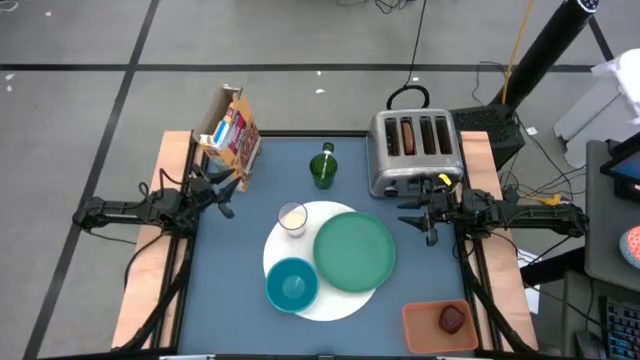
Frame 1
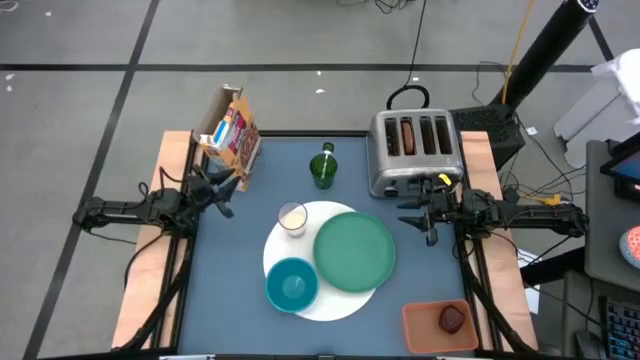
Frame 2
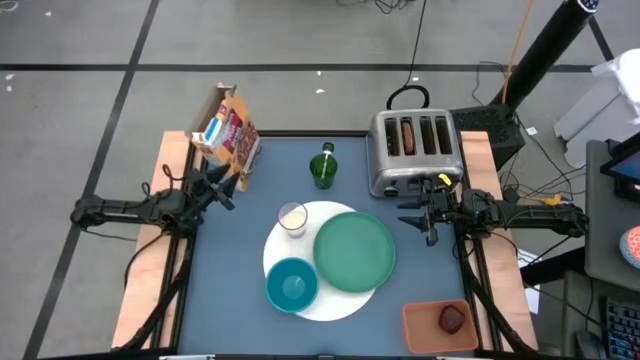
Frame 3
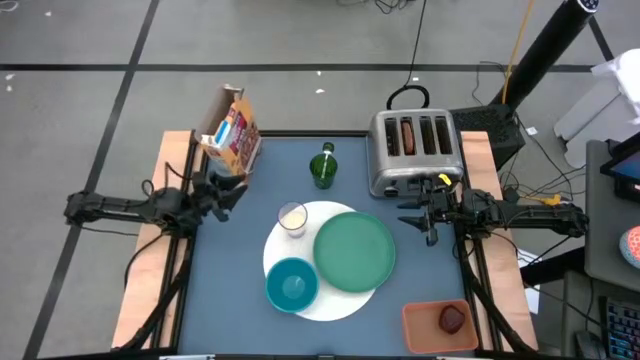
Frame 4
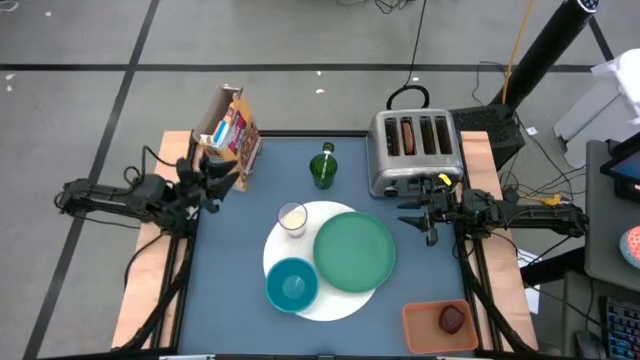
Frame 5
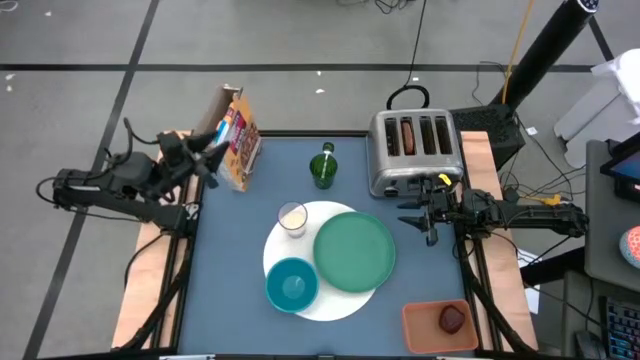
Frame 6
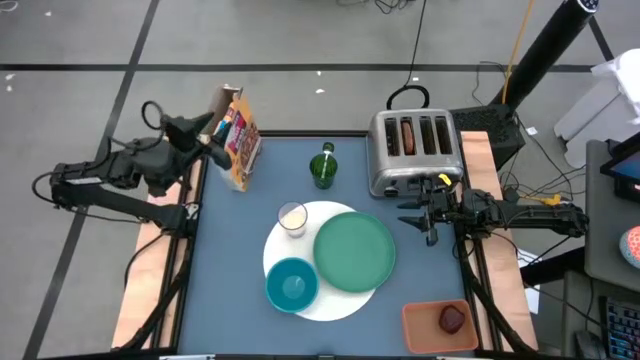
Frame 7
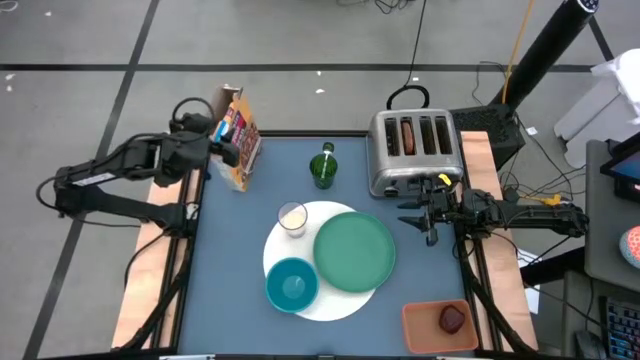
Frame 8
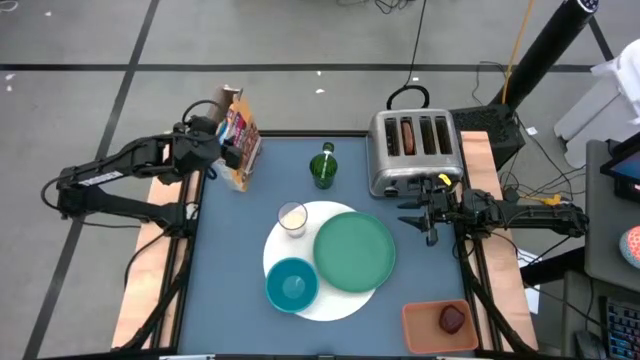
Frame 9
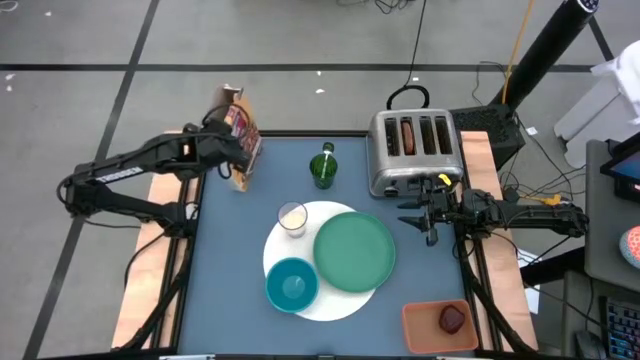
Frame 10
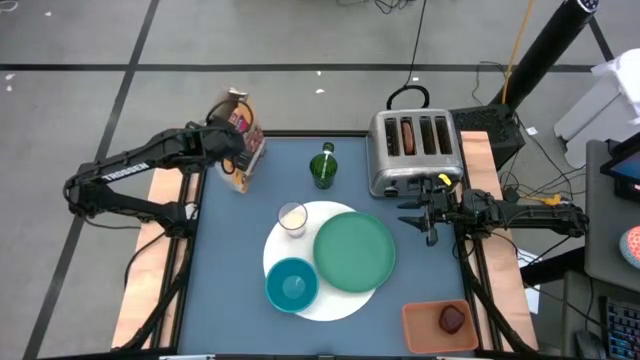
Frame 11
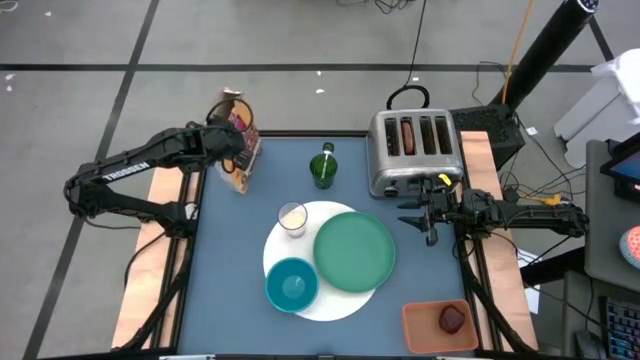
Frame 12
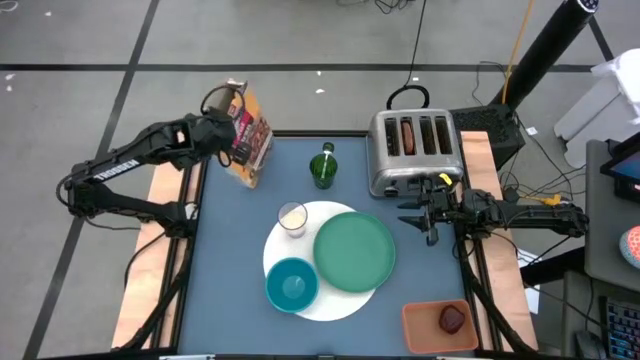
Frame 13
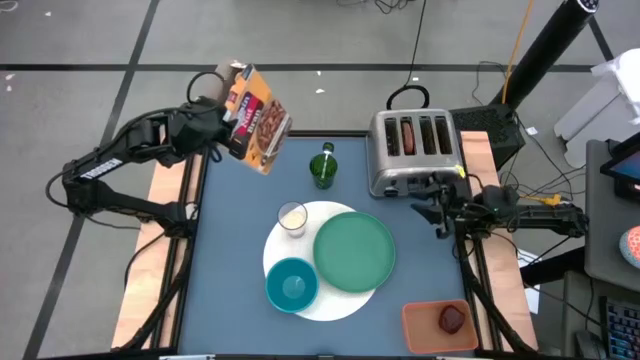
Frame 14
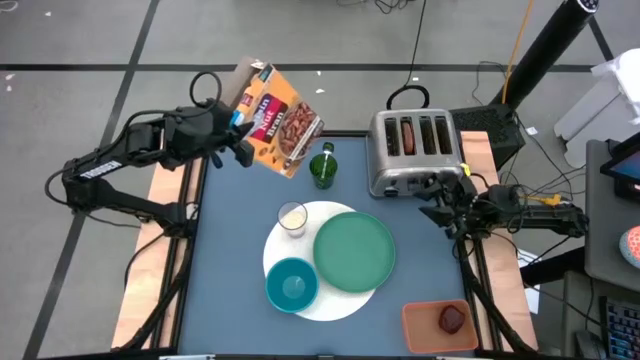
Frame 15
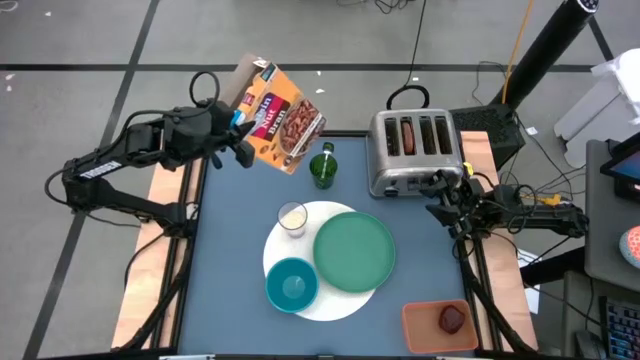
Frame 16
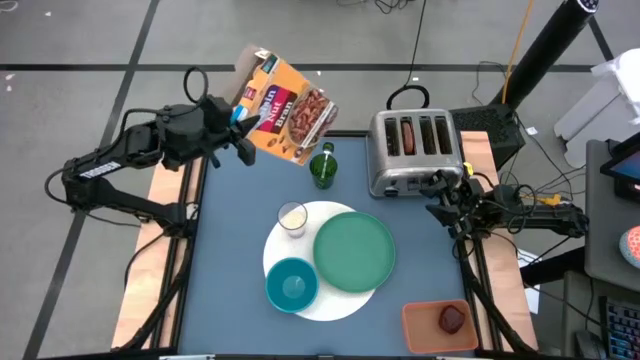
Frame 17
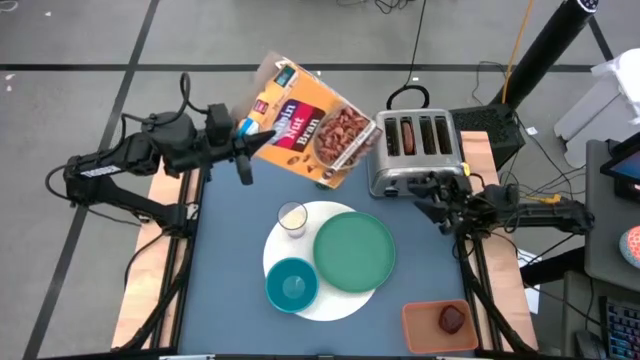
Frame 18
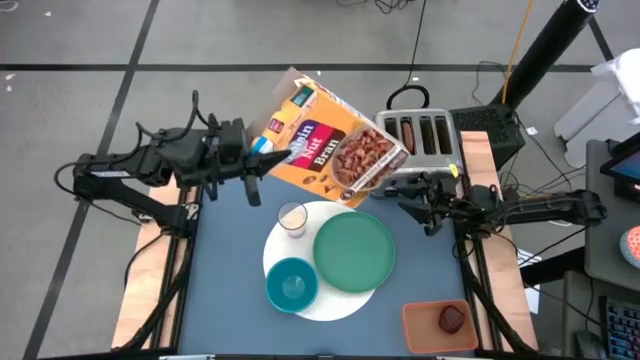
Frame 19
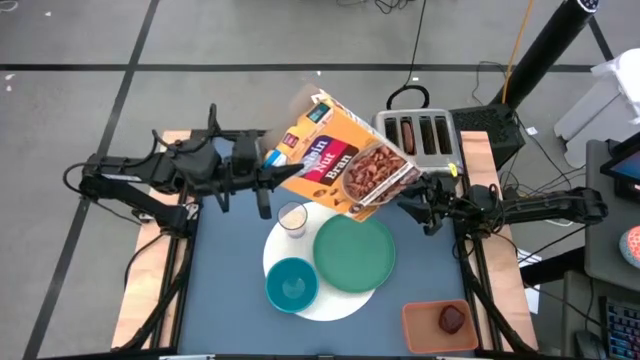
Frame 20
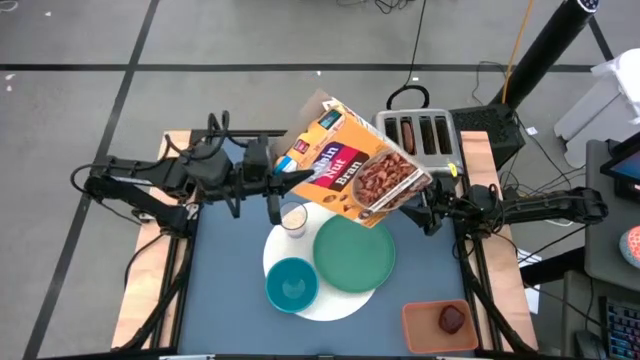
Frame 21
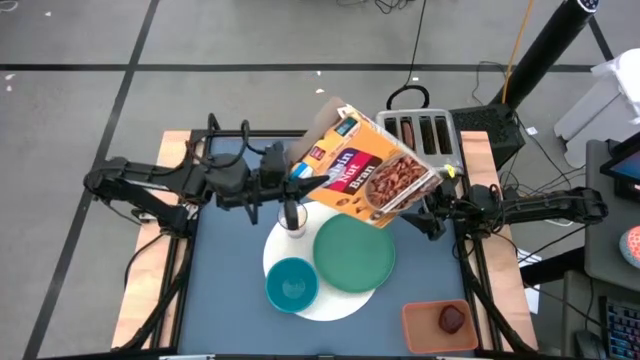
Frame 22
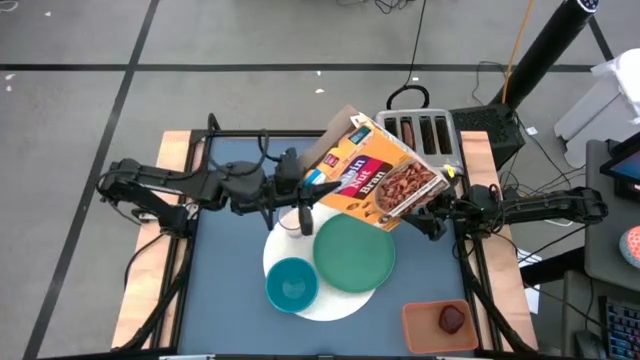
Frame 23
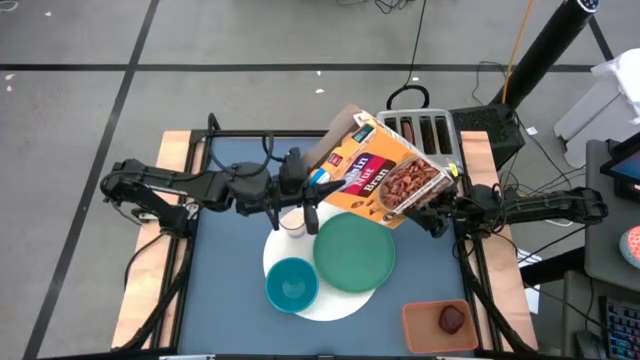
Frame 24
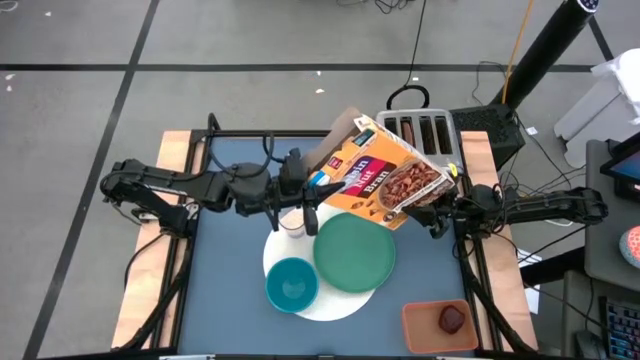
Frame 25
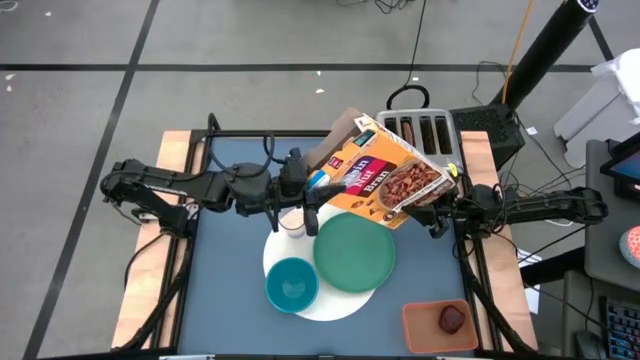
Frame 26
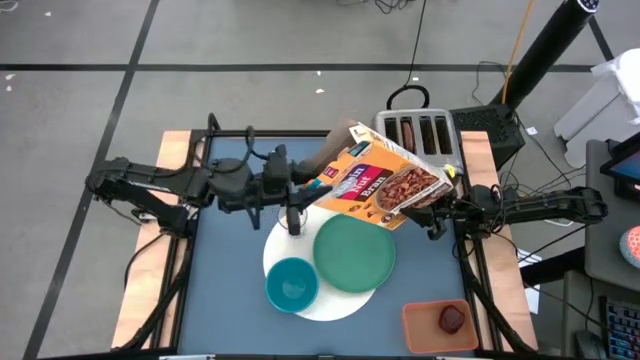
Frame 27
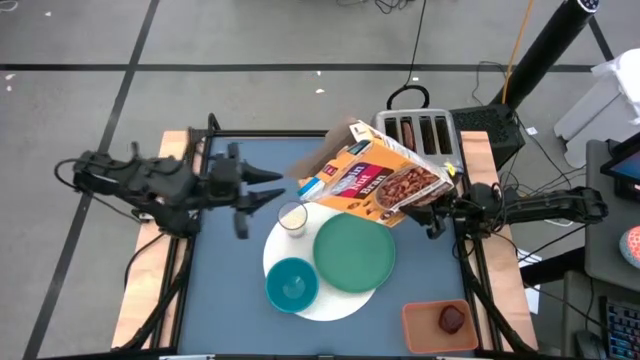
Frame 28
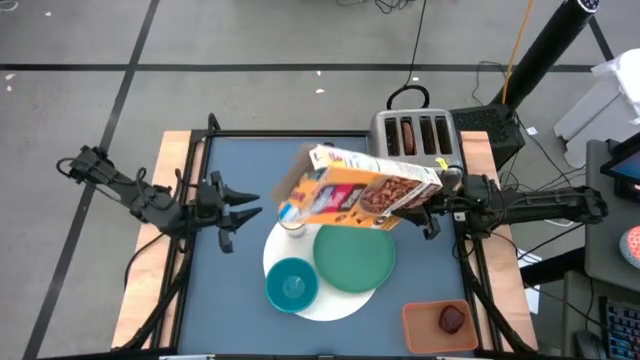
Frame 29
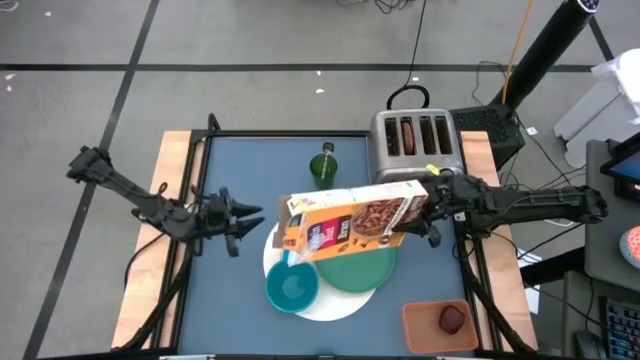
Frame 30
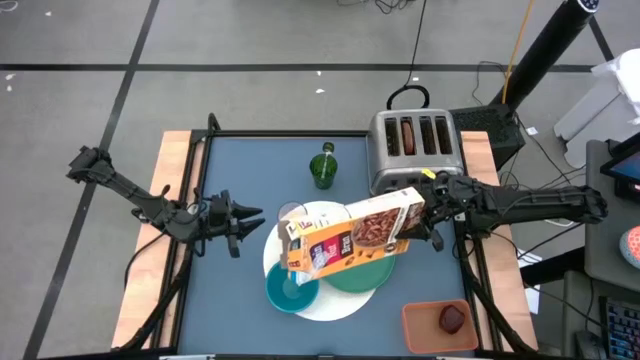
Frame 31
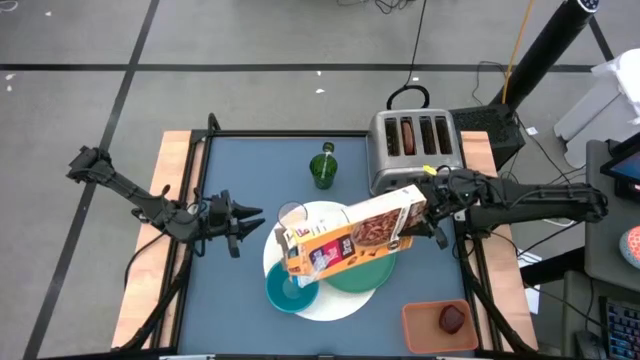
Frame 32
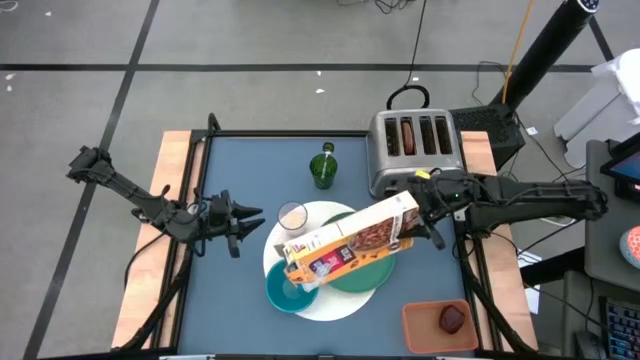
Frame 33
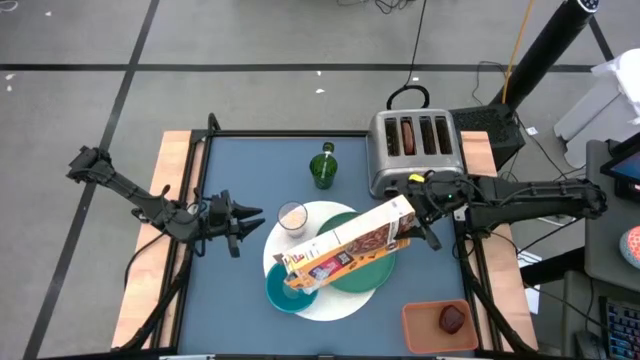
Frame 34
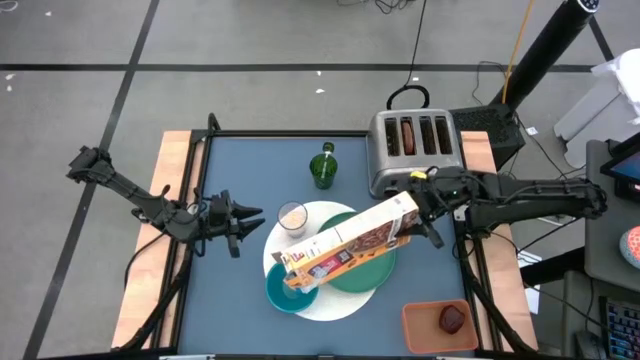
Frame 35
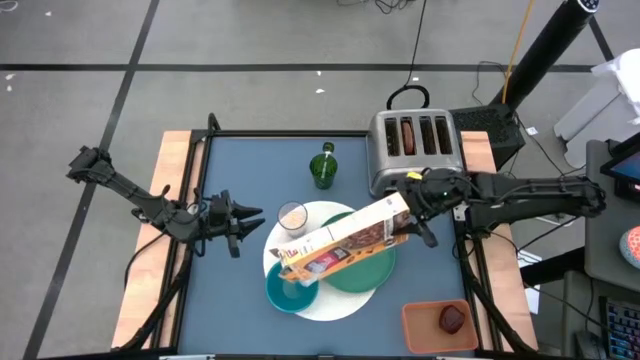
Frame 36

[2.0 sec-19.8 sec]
Task: Arrange a breakfast setting
Pour the cereal from the cereal box into the blue bowl
